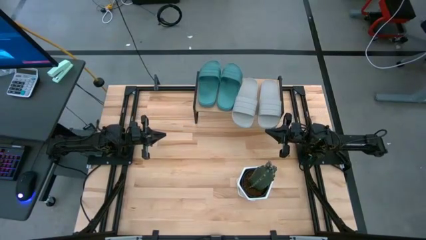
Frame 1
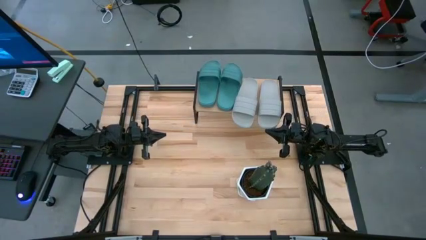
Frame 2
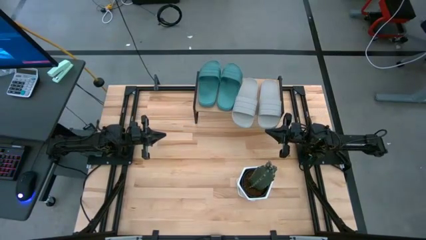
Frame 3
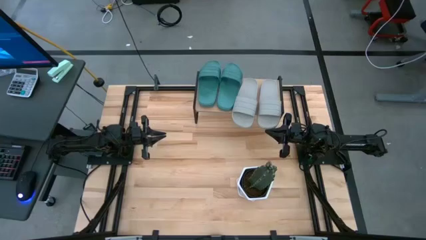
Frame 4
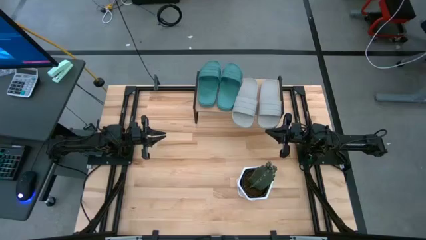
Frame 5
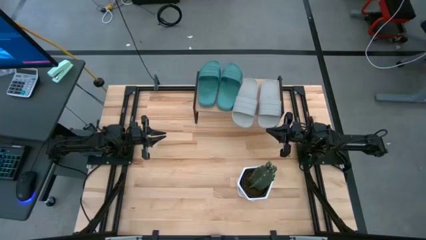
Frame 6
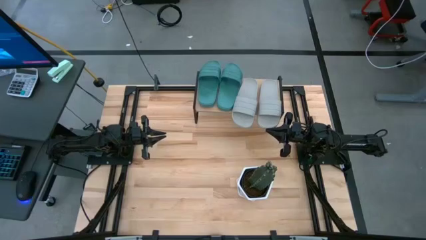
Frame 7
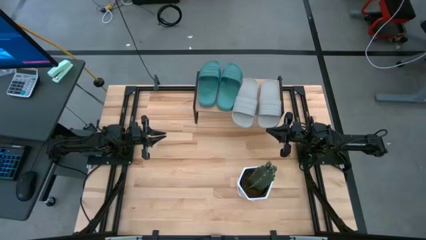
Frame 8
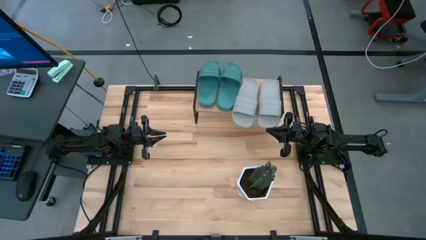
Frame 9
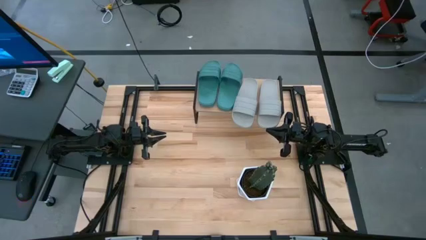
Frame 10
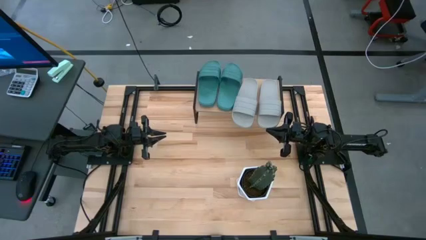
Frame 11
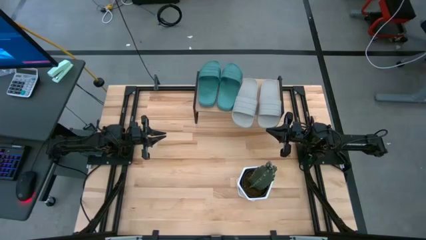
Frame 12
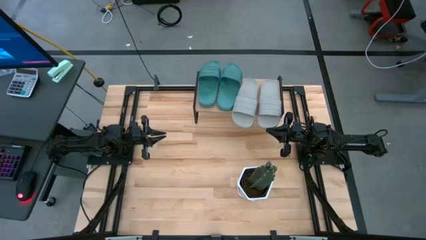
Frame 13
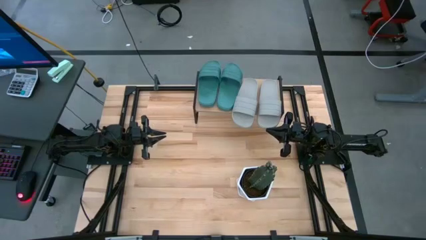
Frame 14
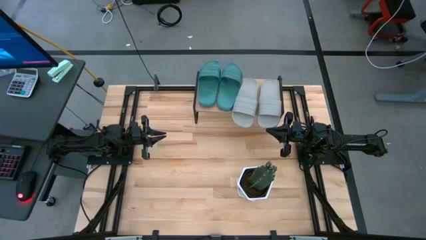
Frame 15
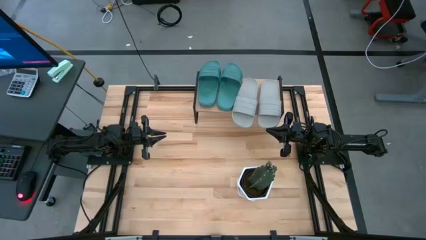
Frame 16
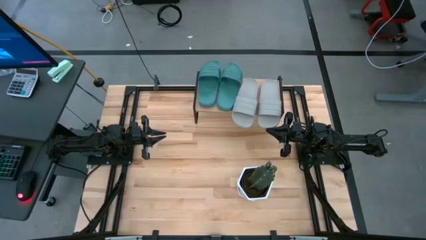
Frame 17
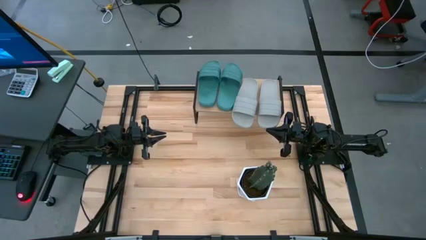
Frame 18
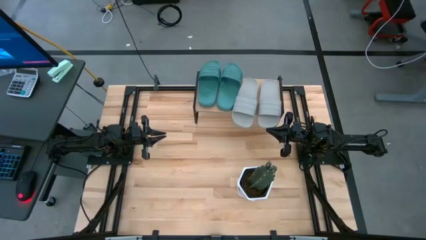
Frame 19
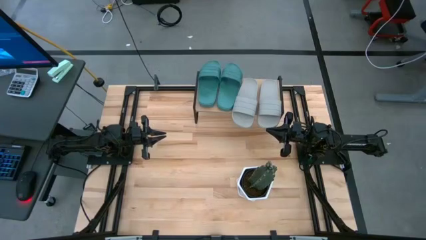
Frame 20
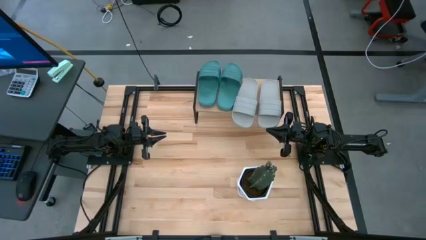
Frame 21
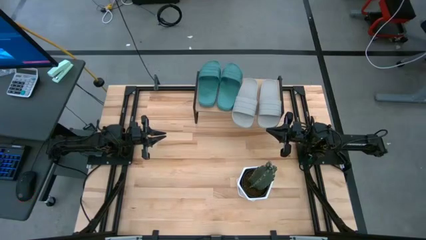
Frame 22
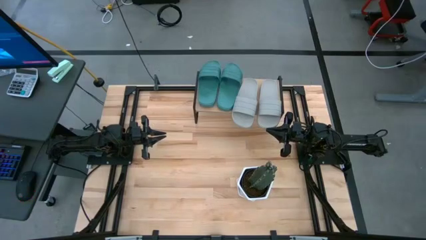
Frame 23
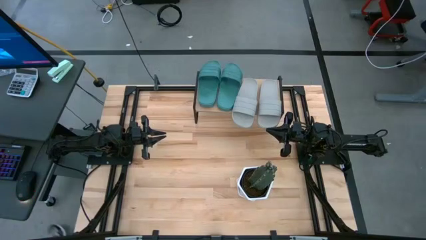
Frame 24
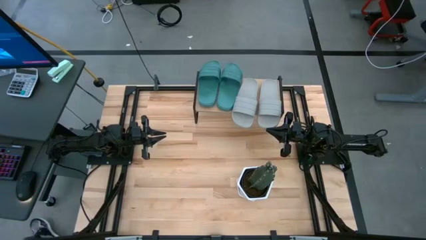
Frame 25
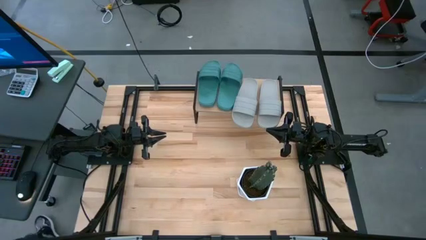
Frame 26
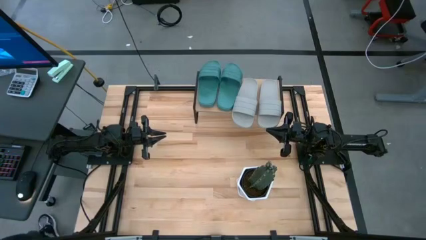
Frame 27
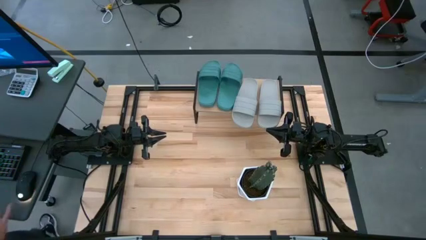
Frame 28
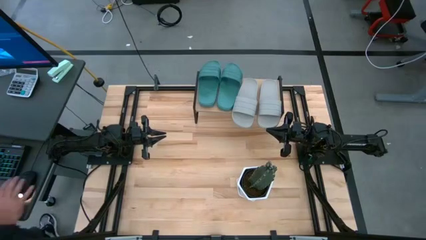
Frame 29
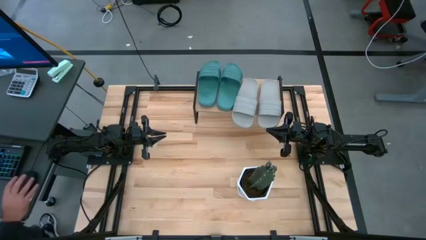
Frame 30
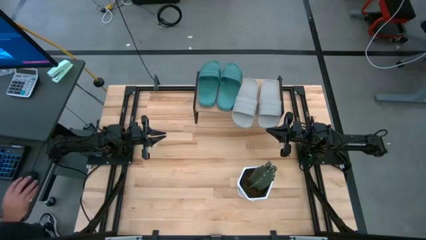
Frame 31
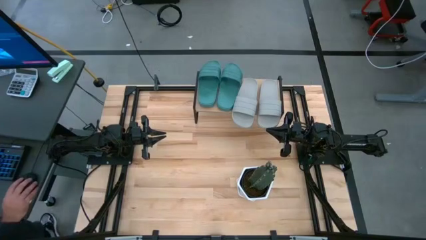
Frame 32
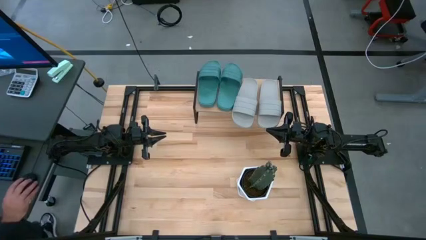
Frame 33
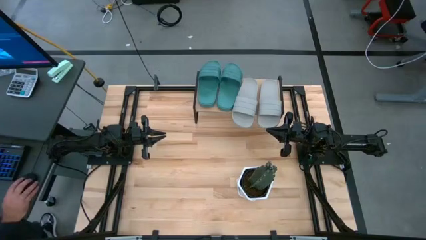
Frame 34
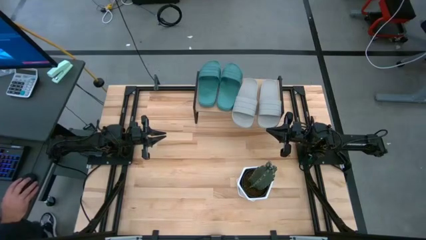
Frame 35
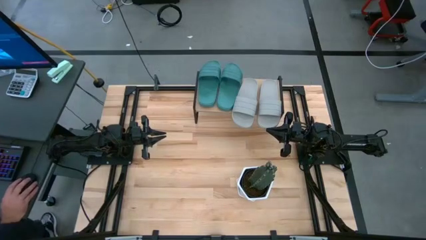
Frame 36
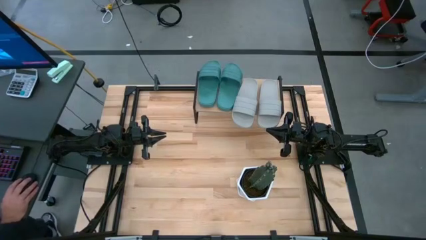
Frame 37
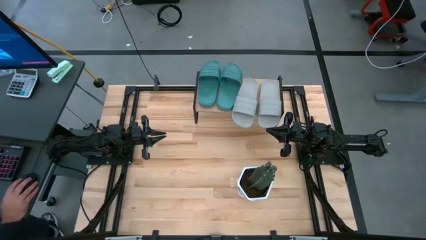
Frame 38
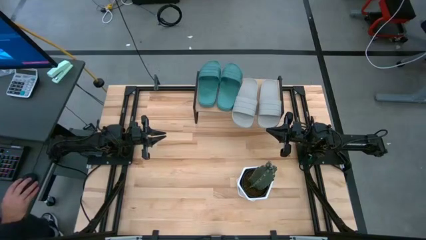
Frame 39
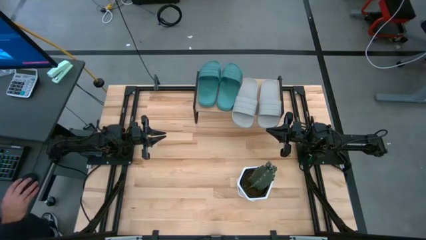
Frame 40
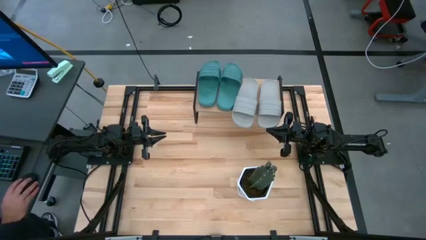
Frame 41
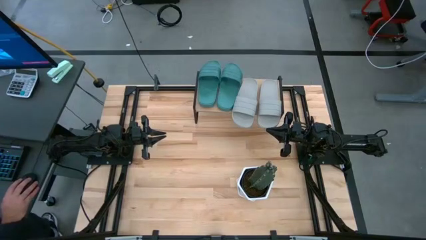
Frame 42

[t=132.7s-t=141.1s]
Task: Pick and place slides into the shelf
Return to Home Position

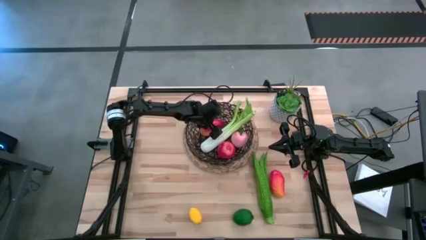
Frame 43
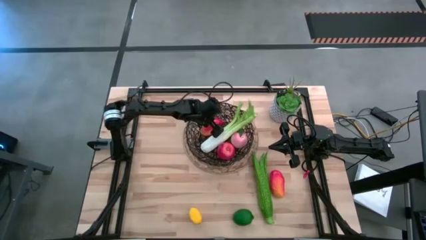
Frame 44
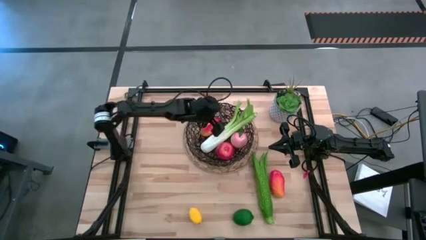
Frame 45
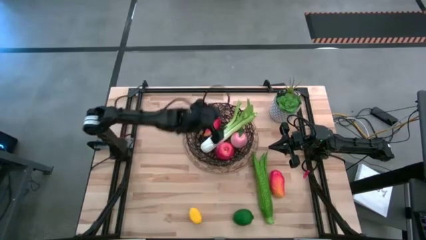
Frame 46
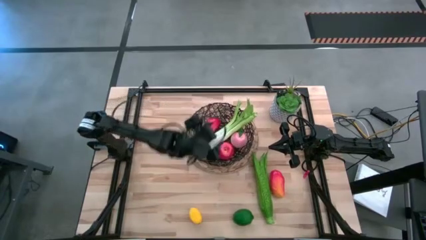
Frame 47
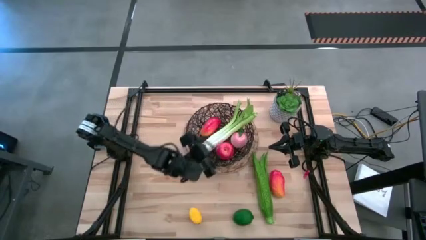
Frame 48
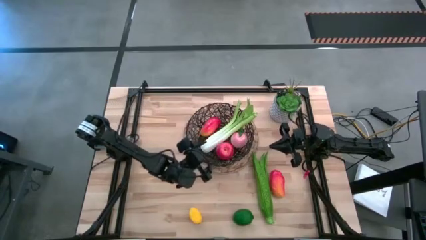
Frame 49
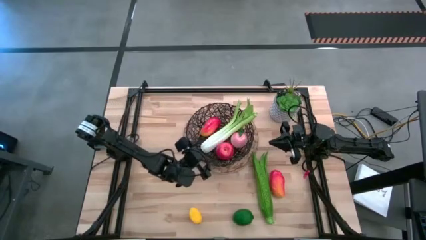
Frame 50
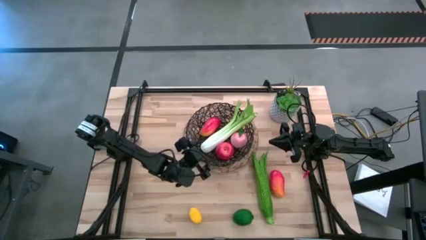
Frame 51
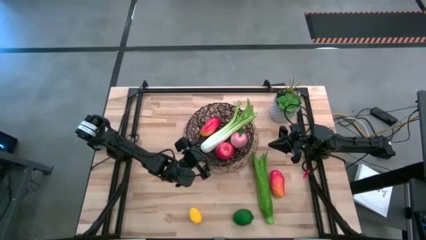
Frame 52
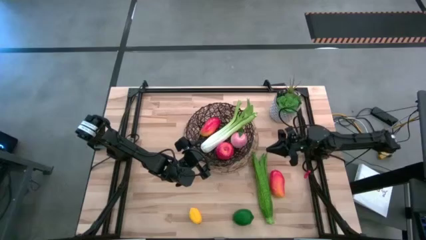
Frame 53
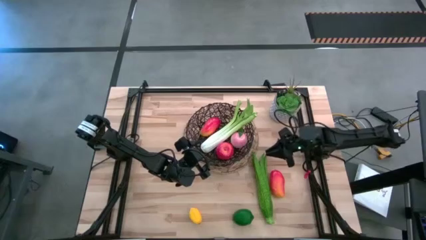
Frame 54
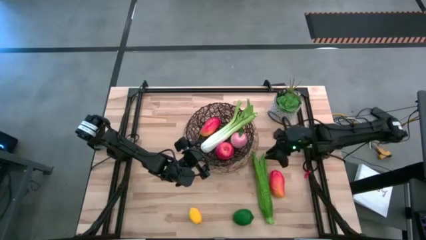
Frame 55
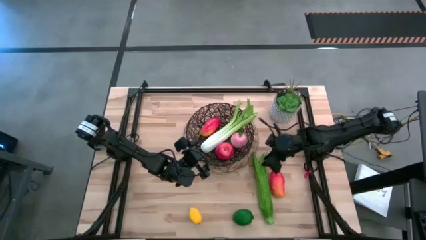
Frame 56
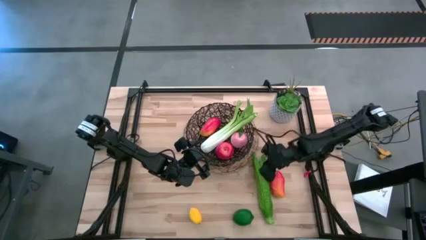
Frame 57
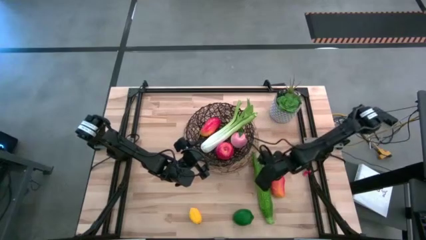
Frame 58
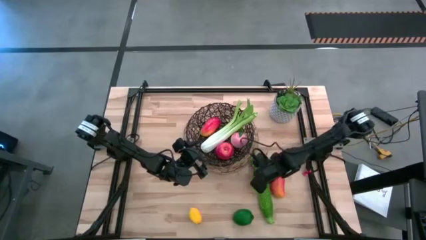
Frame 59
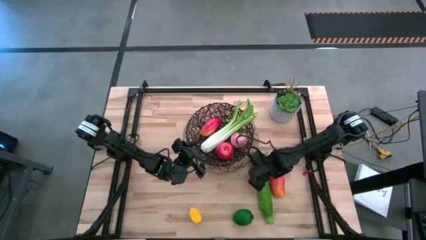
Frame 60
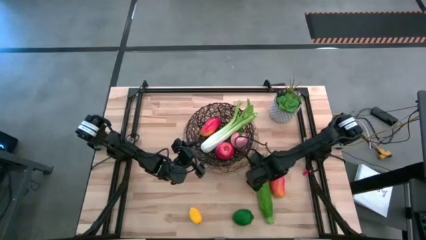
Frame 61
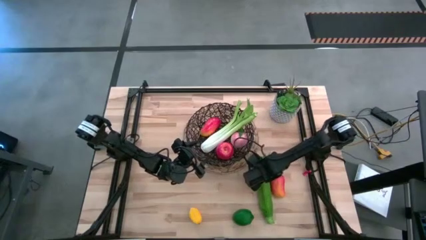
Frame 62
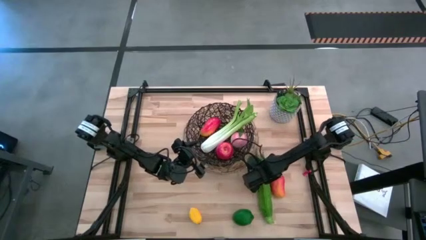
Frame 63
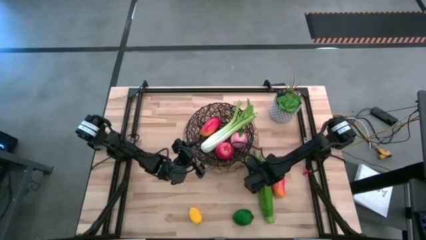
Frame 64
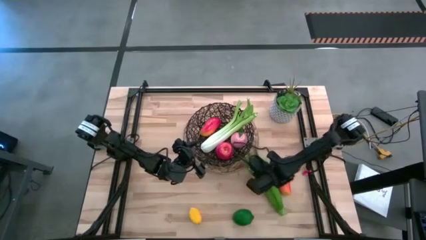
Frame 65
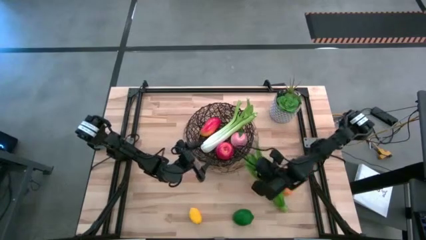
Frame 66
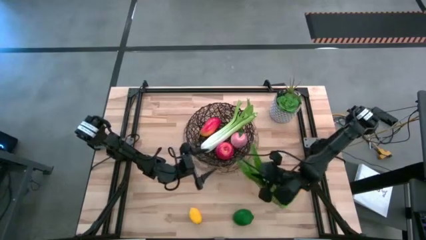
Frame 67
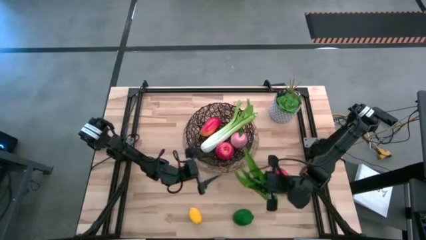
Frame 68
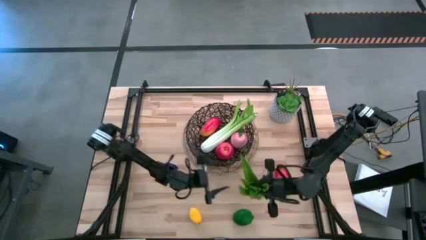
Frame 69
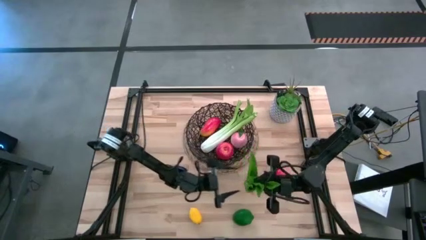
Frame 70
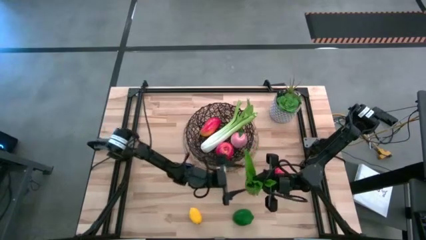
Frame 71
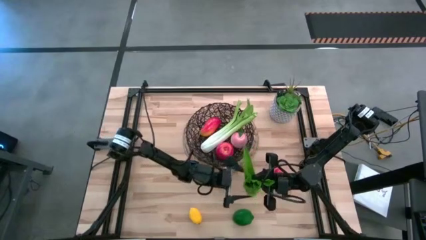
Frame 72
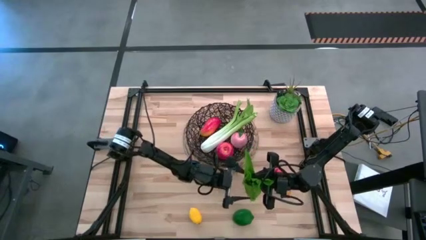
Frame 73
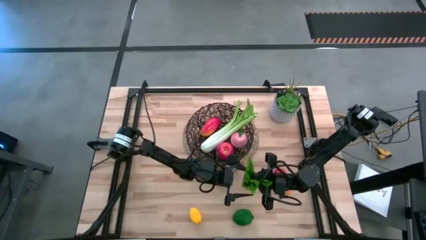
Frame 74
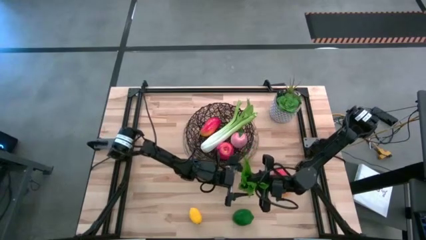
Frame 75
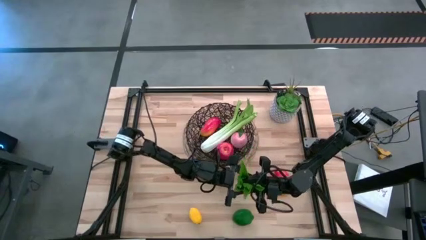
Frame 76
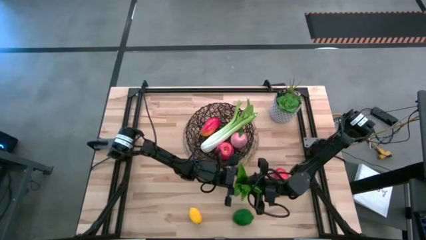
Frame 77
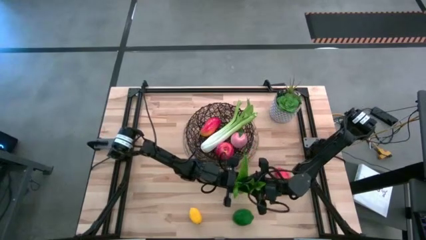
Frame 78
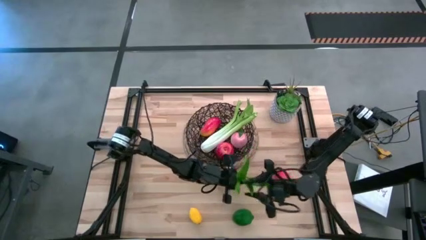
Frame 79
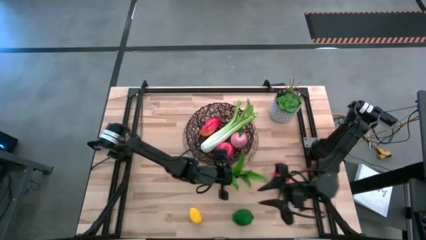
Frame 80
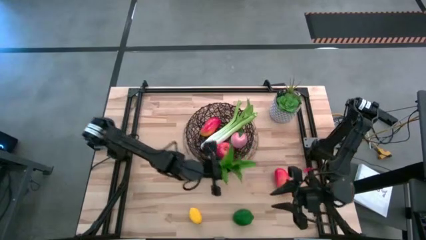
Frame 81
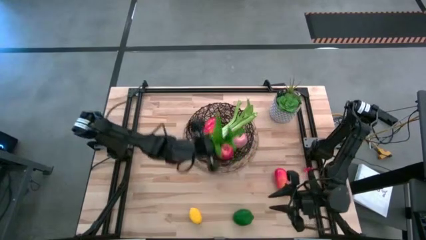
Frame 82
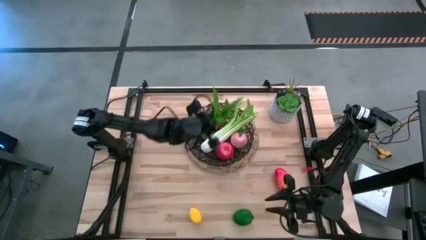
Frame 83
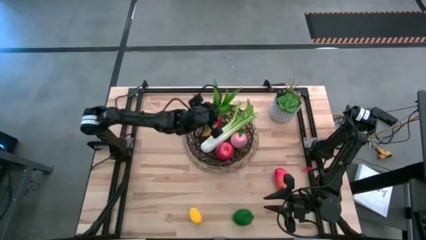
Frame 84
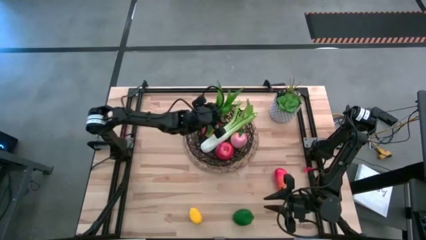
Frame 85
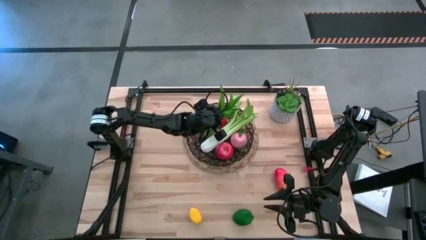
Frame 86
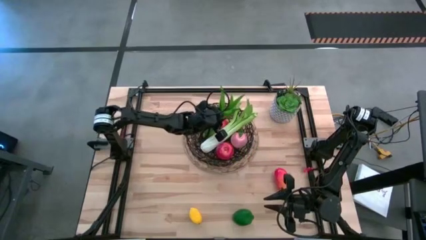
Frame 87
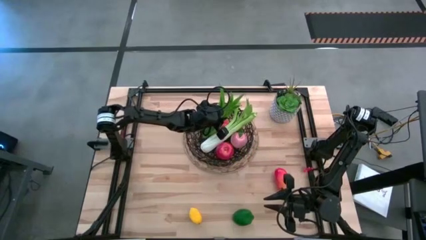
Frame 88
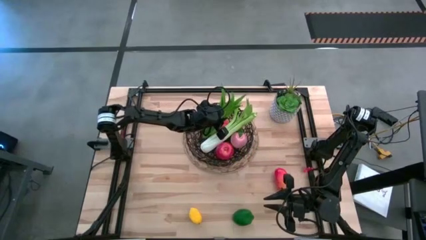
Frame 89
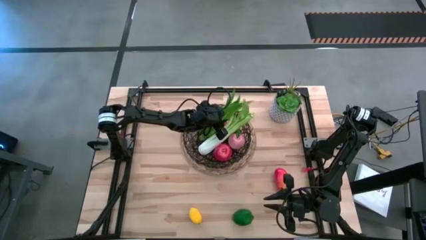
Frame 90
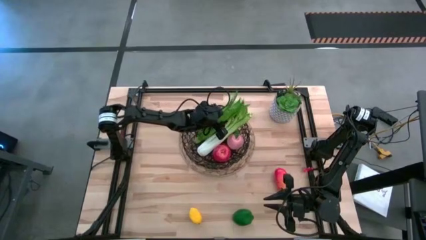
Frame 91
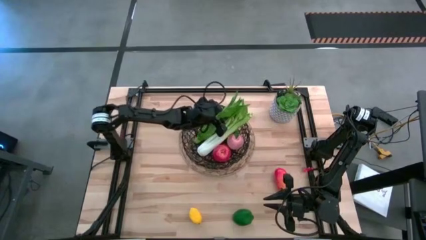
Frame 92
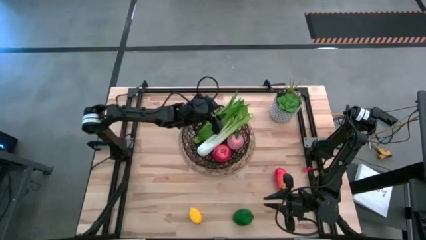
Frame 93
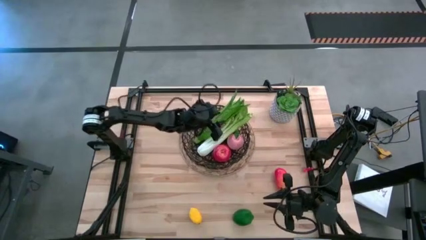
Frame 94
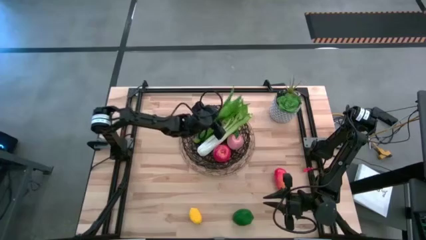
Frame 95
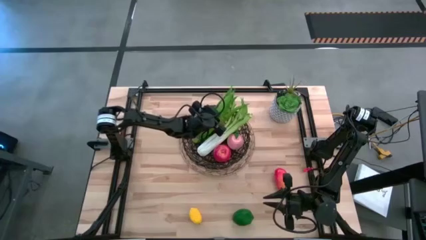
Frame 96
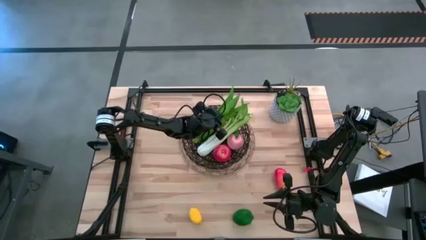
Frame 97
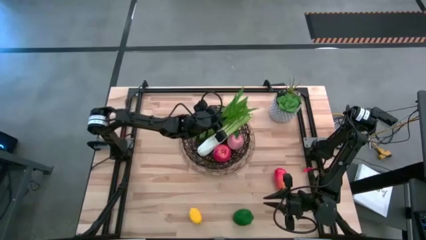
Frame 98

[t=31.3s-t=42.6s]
Task: Build produce basket
Put the green leaf lettuce into the black mesh basket
